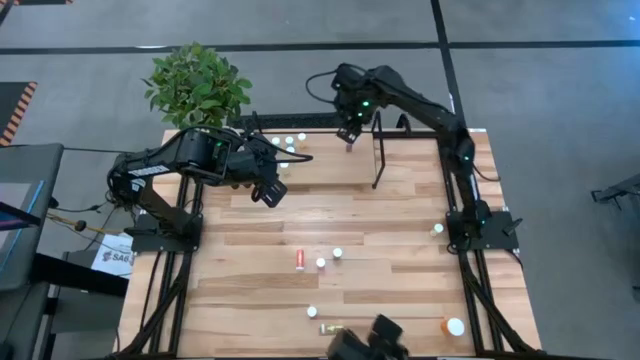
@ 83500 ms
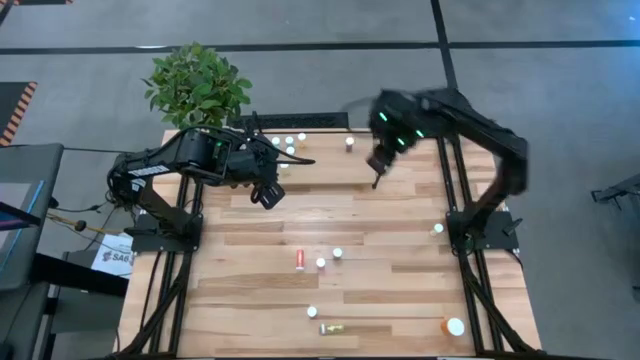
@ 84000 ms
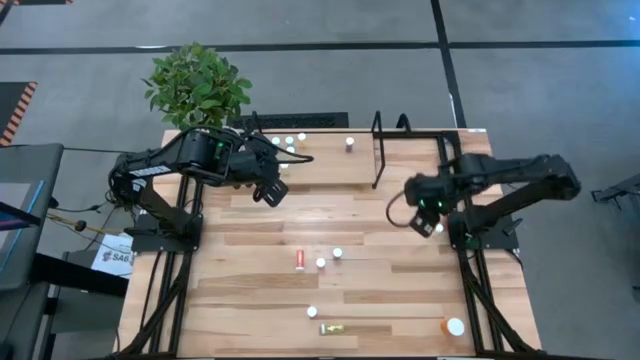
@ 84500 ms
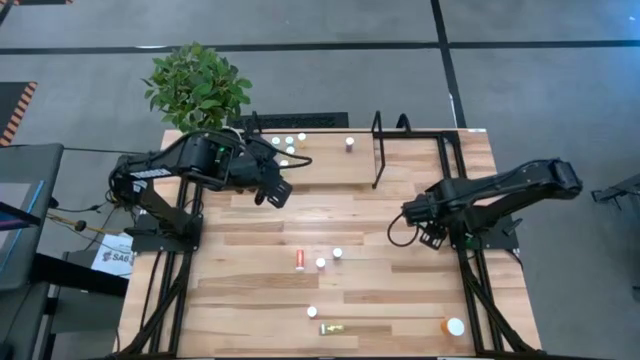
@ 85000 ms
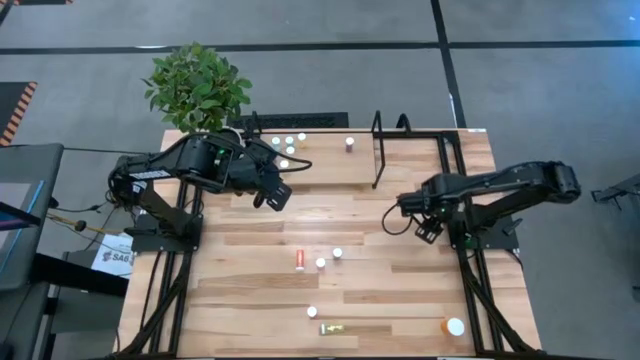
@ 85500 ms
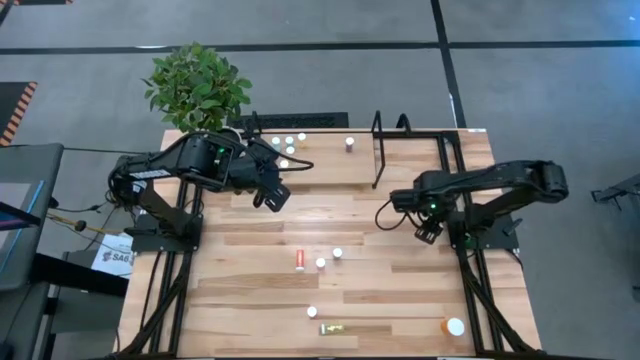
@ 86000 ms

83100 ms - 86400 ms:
Task: Pick and place medicine bottles onto shelf by color
Put the yellow pill bottle on the shelf

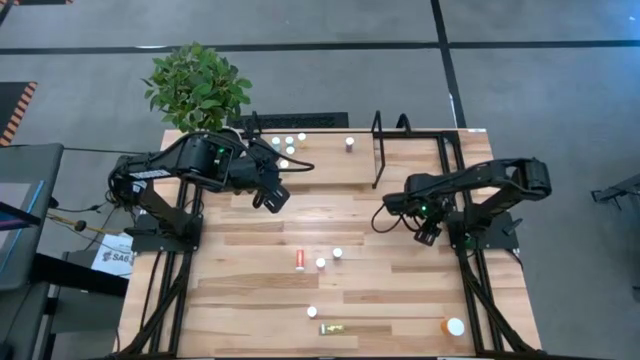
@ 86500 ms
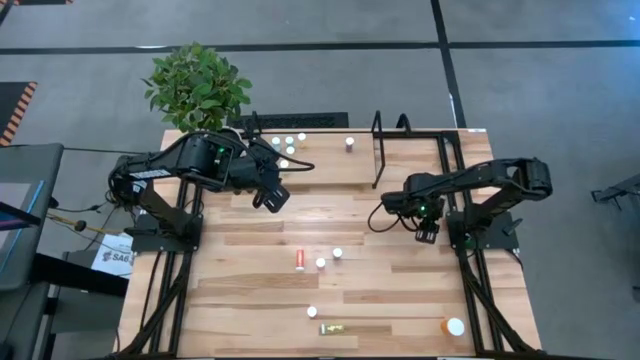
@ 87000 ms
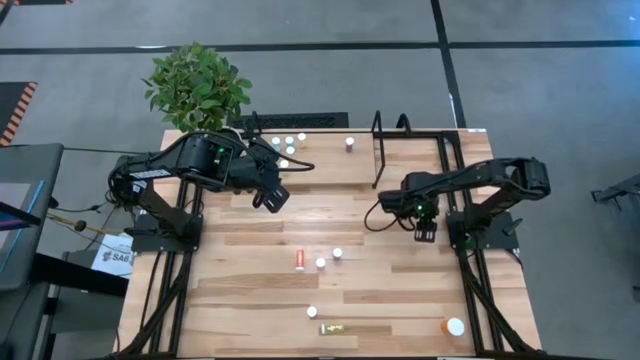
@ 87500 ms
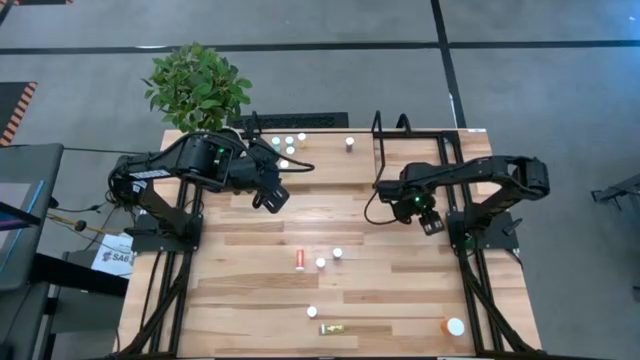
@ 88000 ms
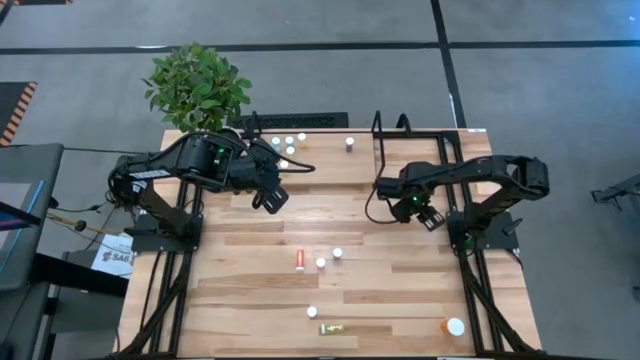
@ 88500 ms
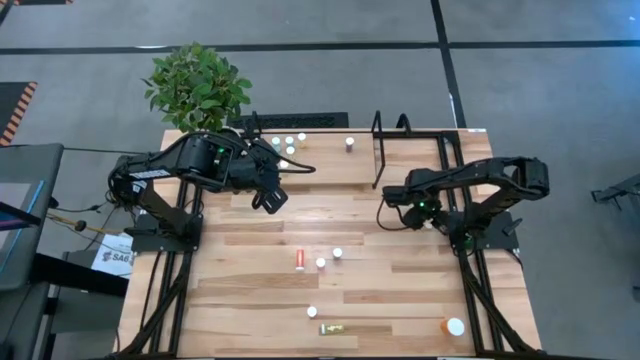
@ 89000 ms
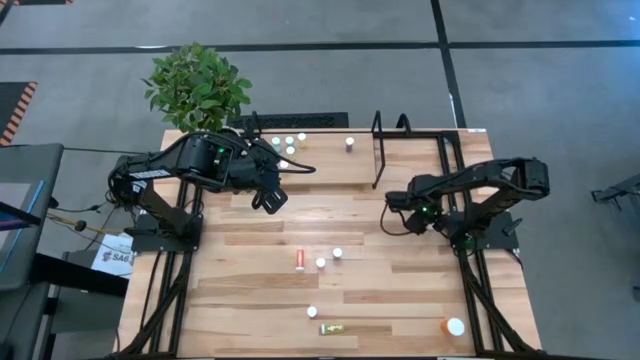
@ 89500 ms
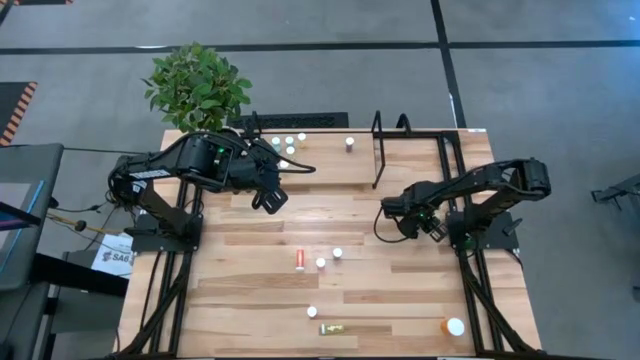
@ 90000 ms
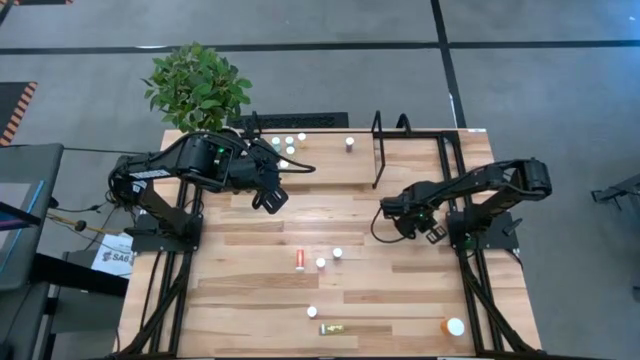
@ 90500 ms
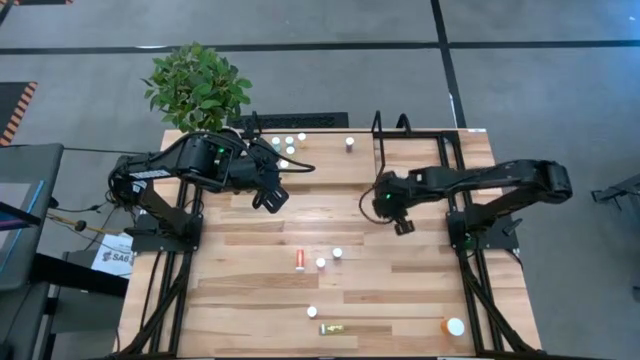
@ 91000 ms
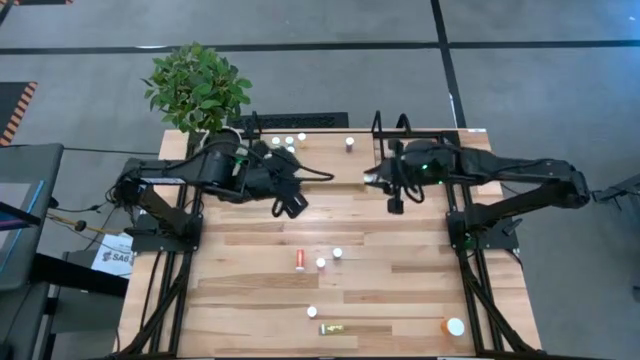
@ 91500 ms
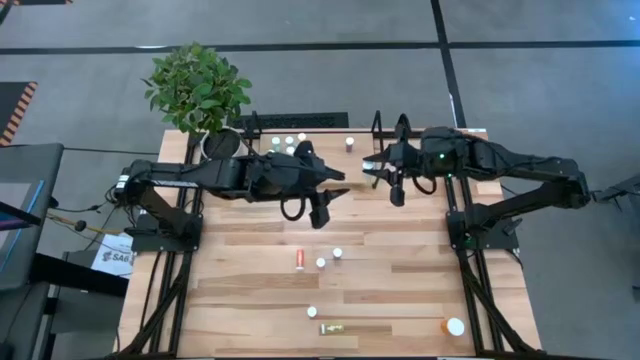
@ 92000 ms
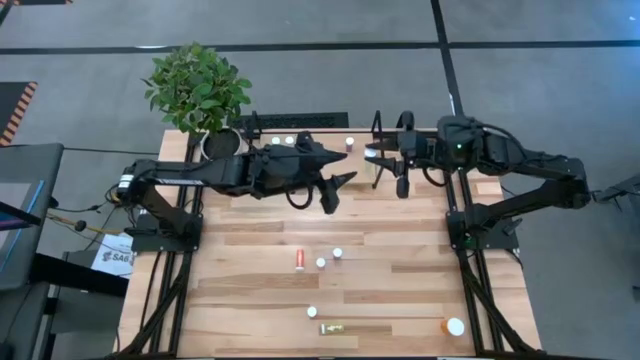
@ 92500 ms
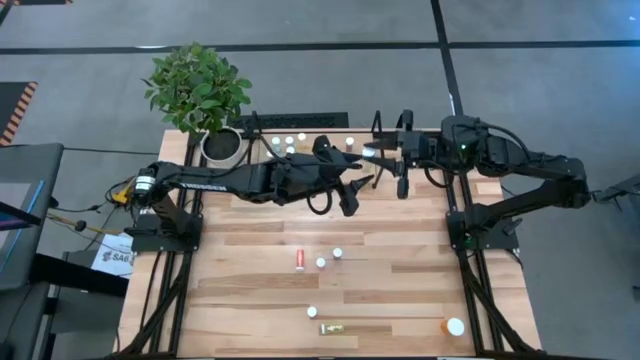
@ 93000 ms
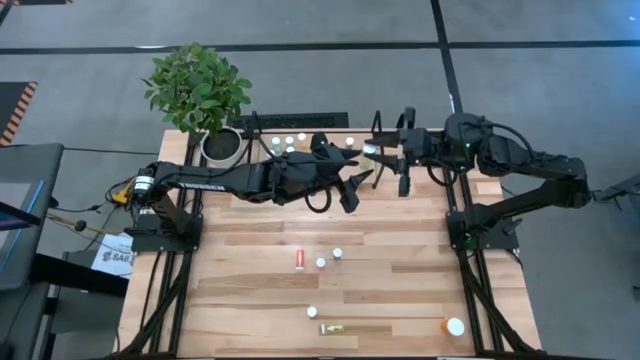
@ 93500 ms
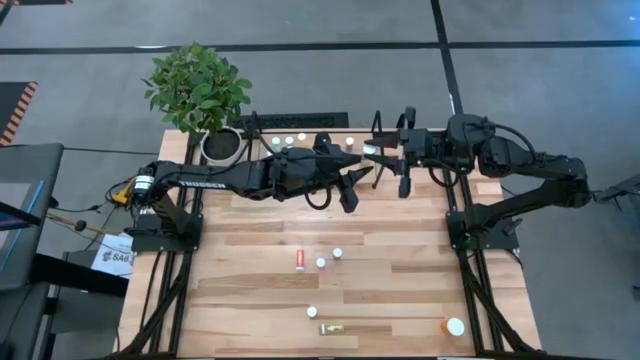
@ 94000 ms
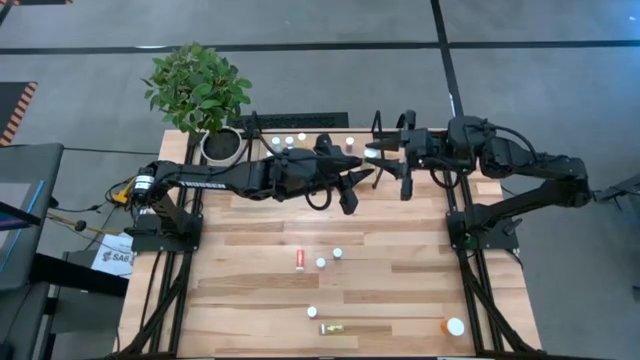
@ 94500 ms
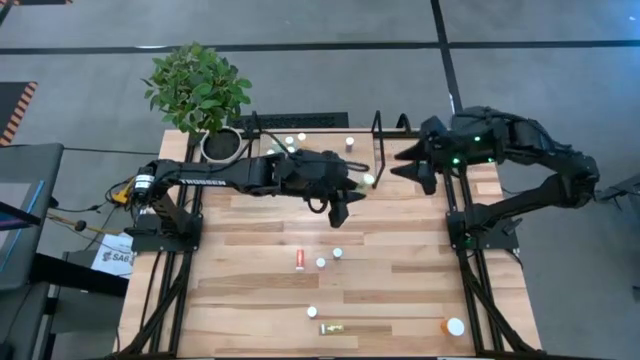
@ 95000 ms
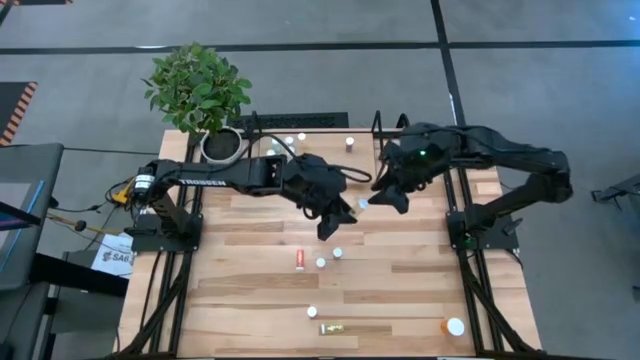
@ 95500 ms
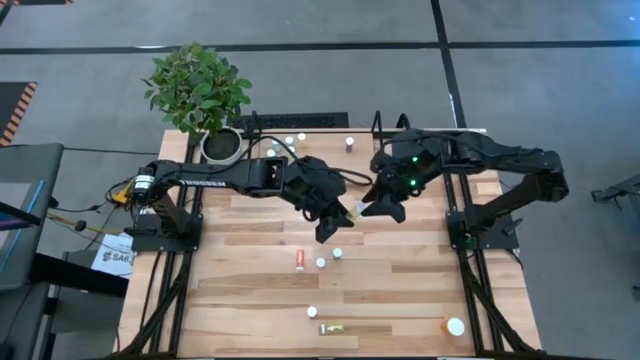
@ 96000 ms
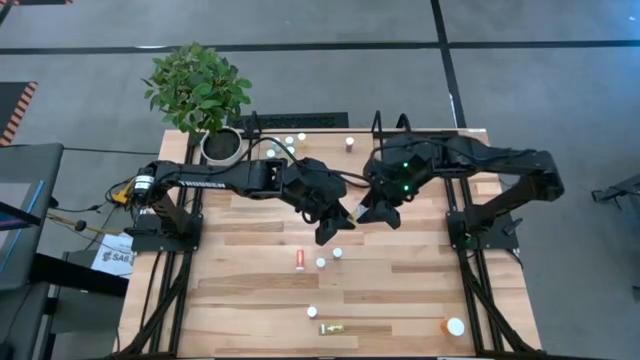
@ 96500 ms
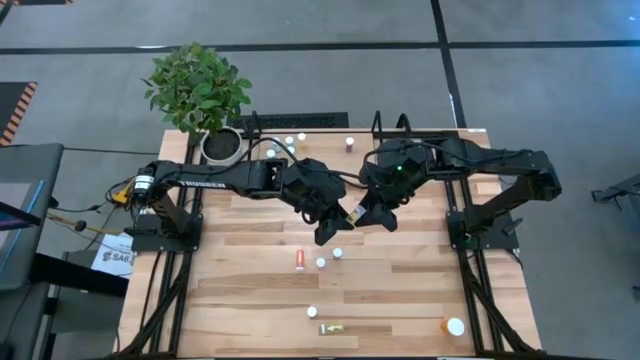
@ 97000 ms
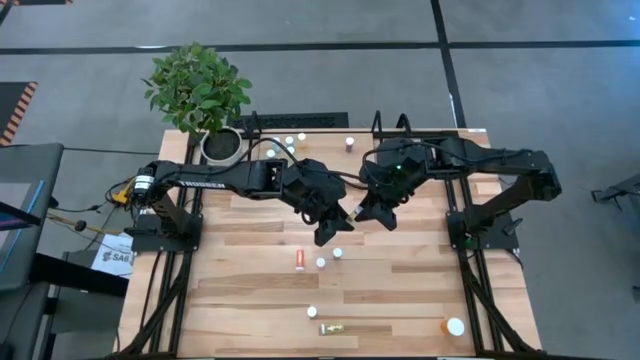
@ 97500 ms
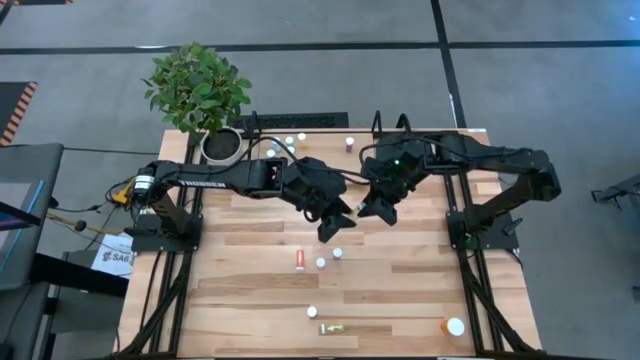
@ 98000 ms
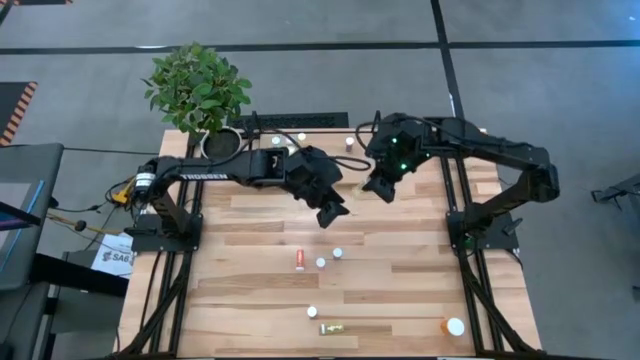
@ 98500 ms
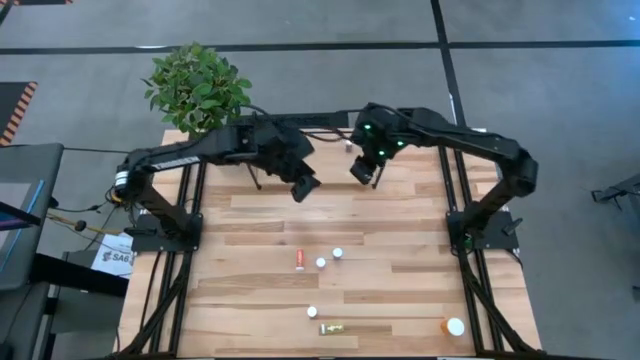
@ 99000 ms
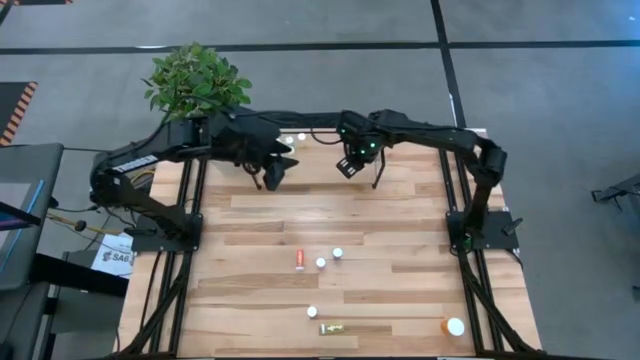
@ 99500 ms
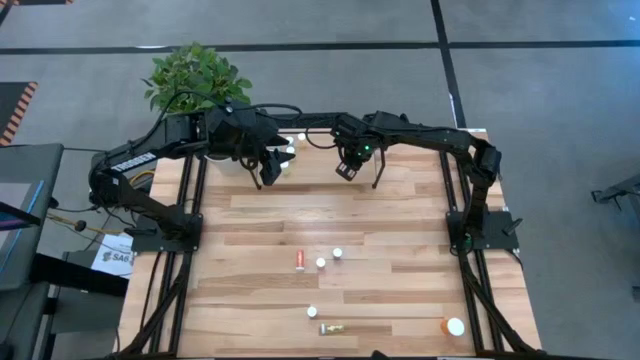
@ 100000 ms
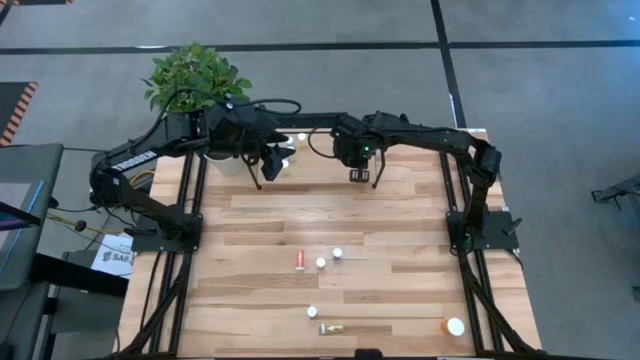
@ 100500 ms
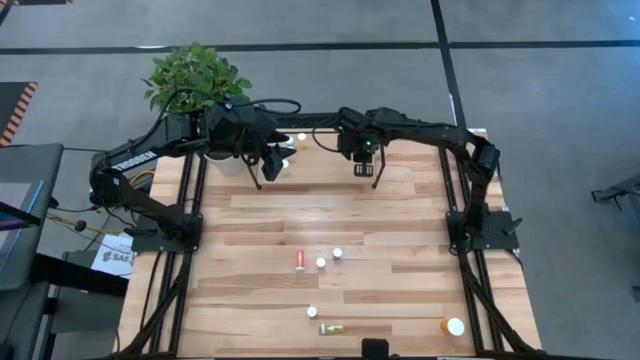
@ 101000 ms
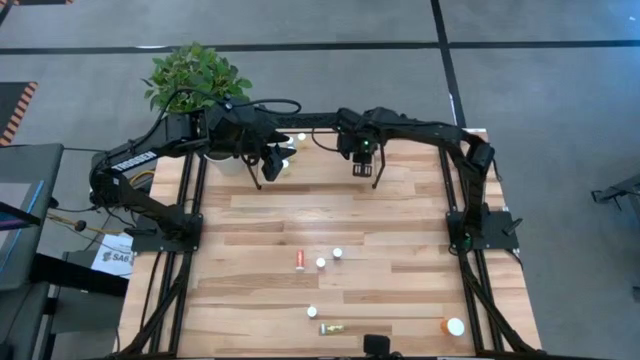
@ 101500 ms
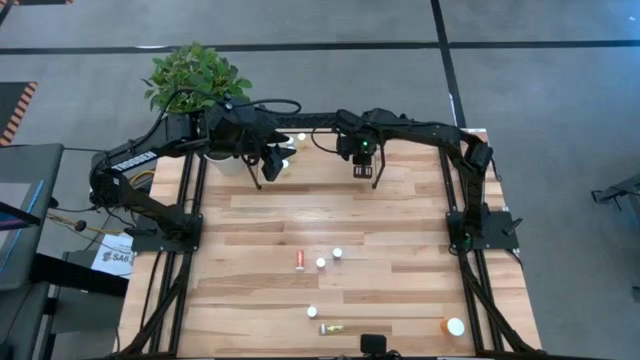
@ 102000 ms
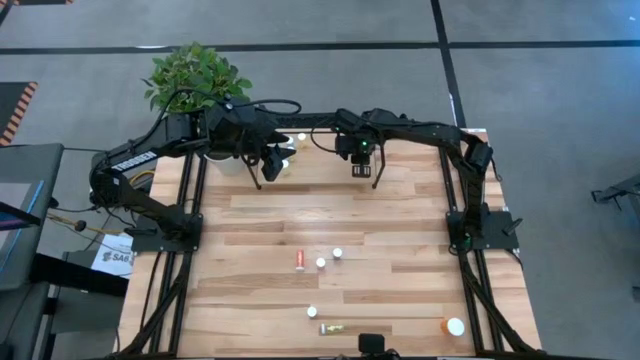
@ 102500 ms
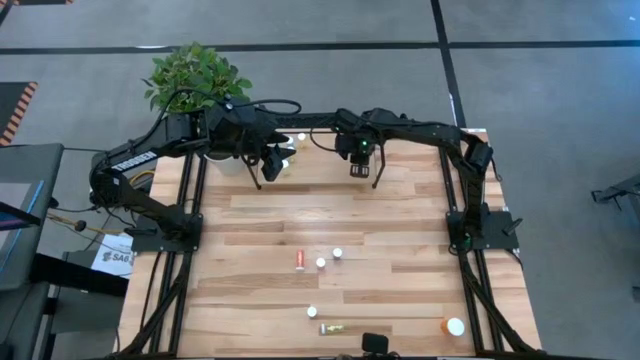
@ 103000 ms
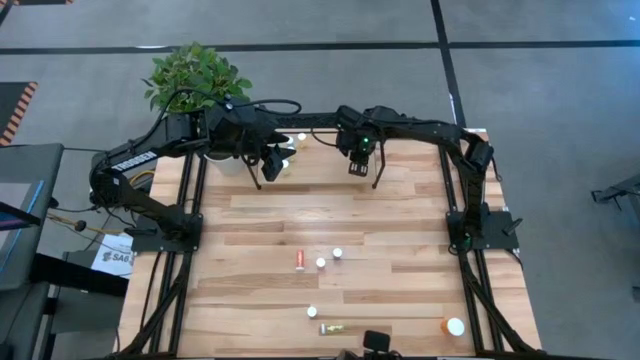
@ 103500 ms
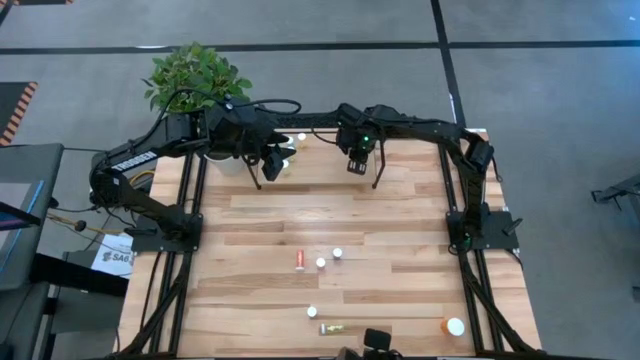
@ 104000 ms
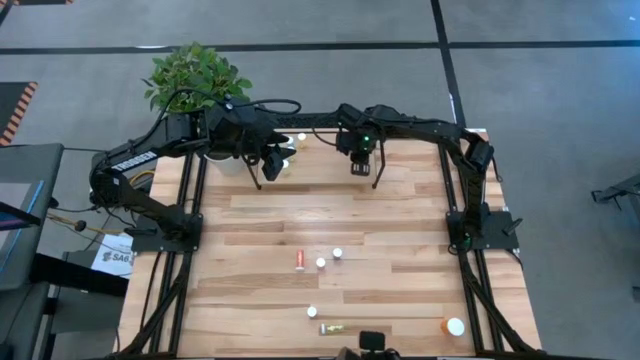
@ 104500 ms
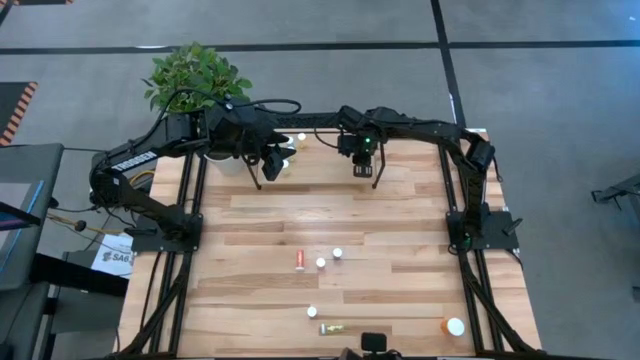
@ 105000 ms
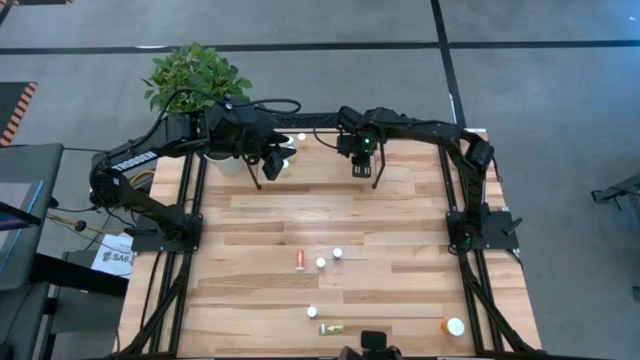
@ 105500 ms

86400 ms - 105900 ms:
Put the yellow pill bottle on the shelf
